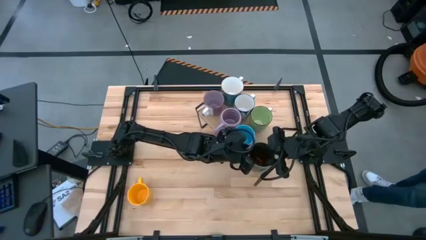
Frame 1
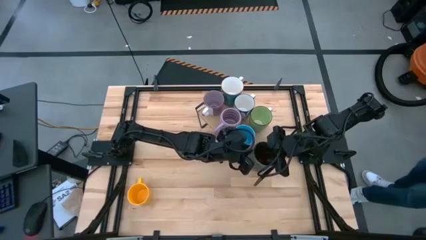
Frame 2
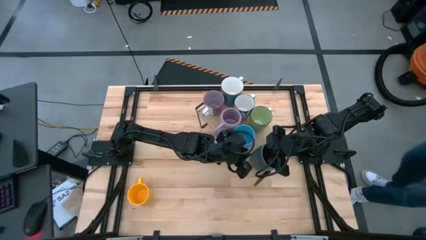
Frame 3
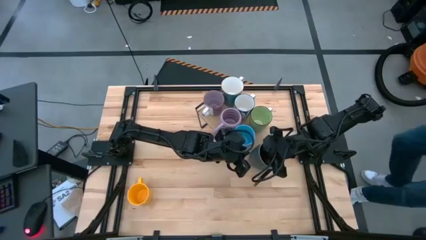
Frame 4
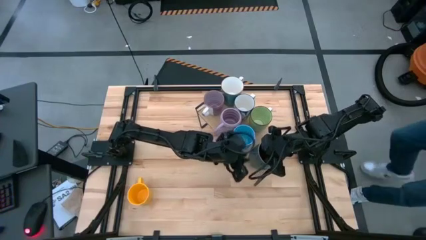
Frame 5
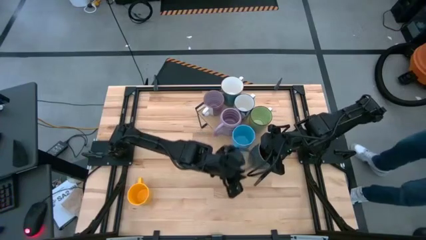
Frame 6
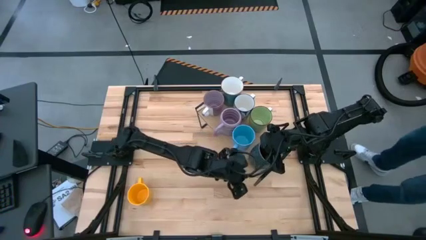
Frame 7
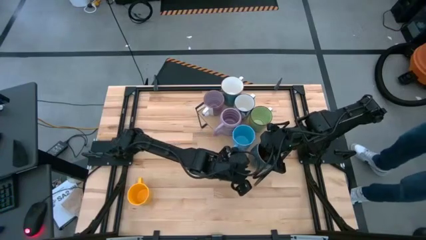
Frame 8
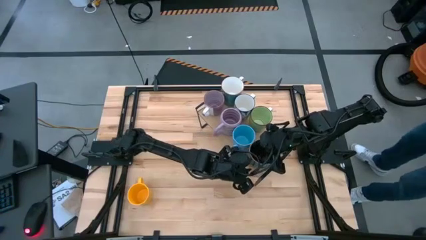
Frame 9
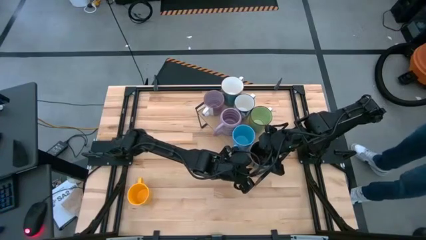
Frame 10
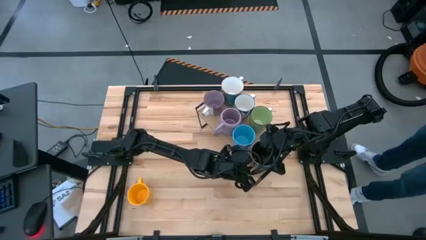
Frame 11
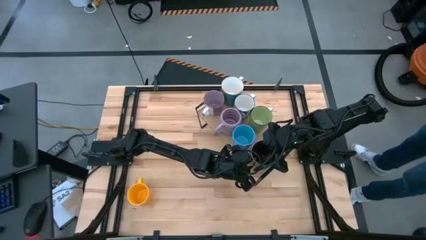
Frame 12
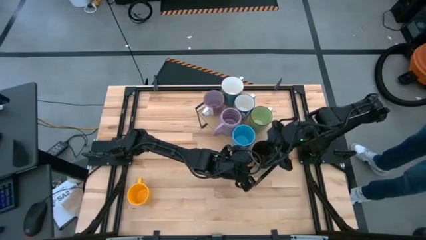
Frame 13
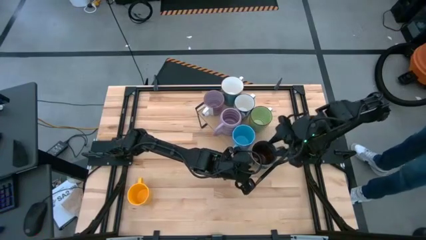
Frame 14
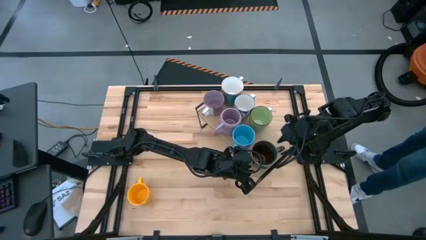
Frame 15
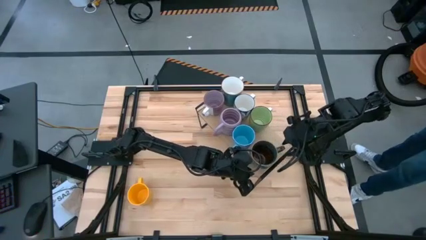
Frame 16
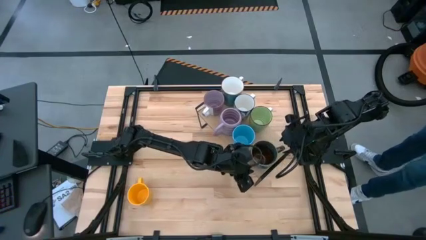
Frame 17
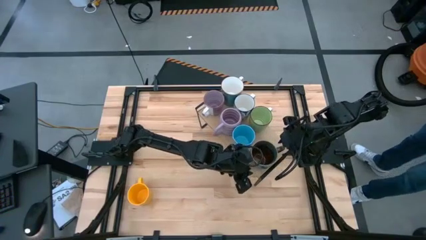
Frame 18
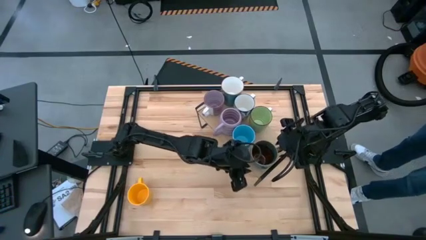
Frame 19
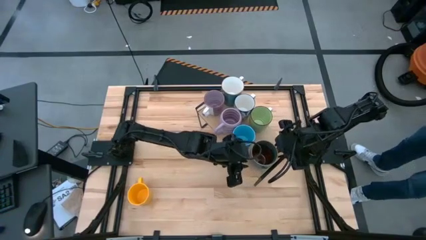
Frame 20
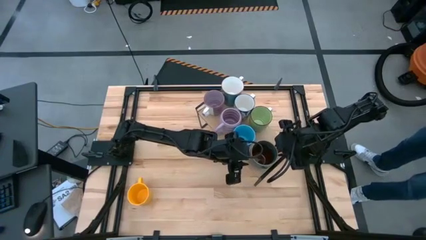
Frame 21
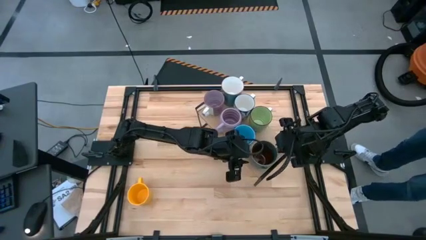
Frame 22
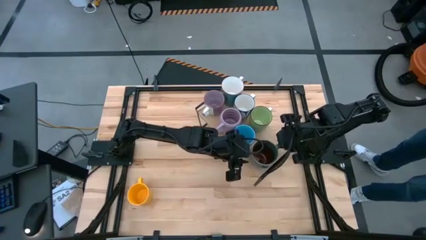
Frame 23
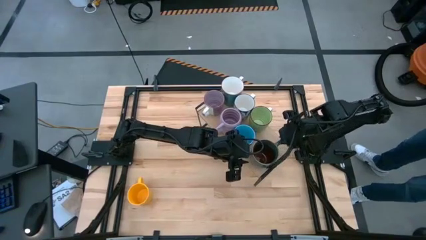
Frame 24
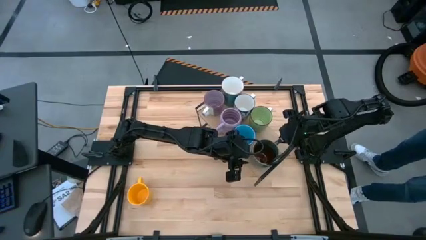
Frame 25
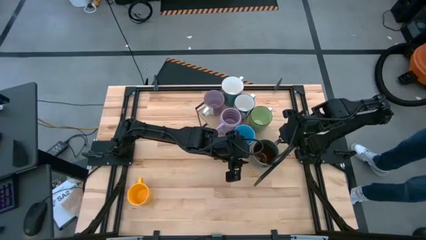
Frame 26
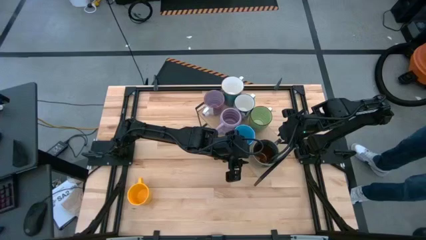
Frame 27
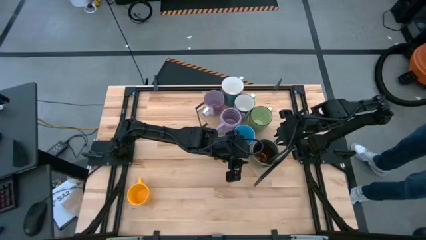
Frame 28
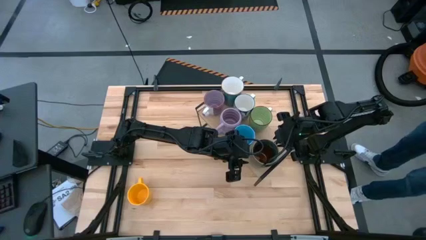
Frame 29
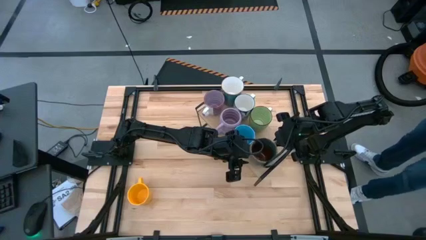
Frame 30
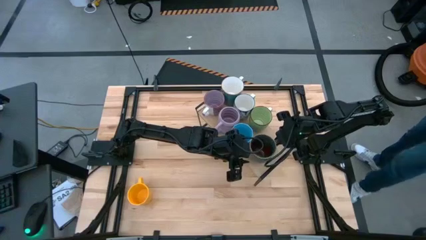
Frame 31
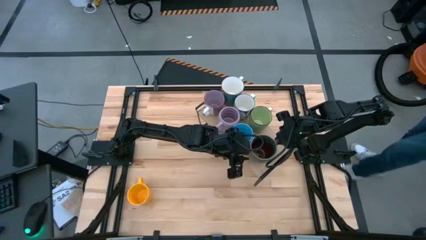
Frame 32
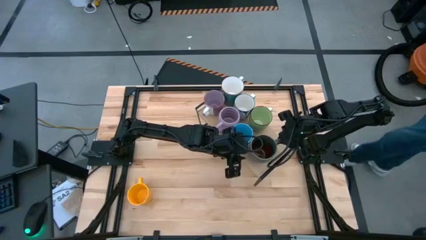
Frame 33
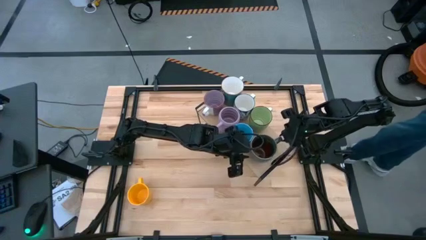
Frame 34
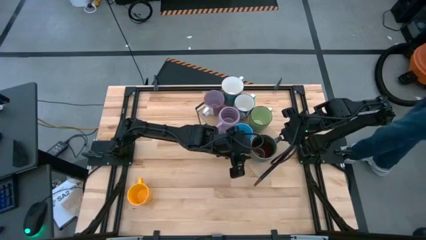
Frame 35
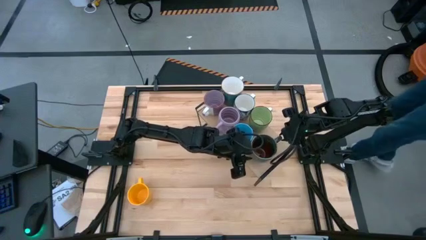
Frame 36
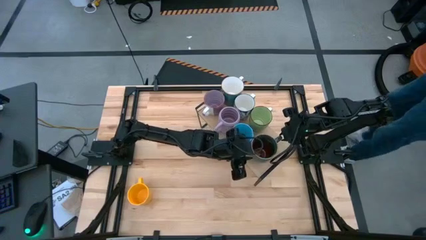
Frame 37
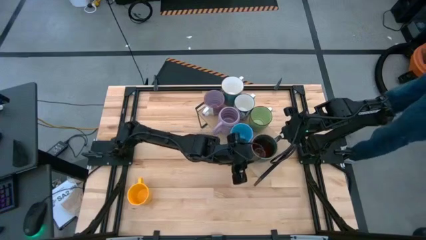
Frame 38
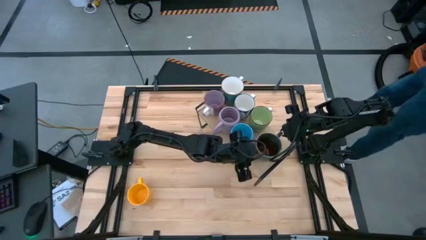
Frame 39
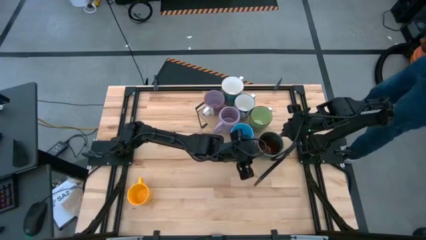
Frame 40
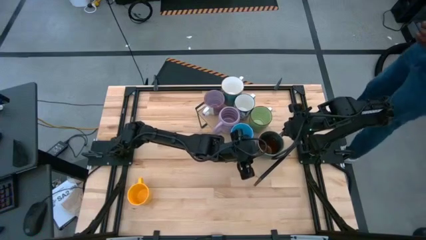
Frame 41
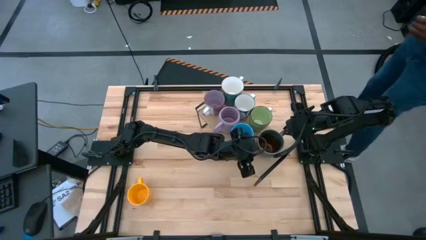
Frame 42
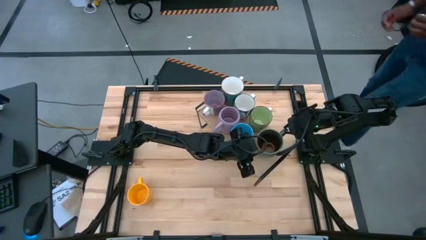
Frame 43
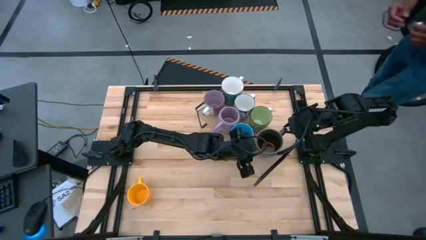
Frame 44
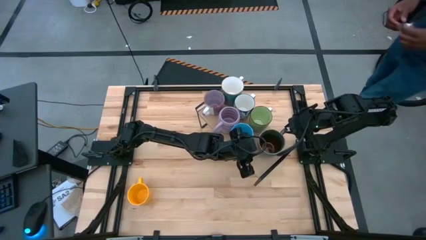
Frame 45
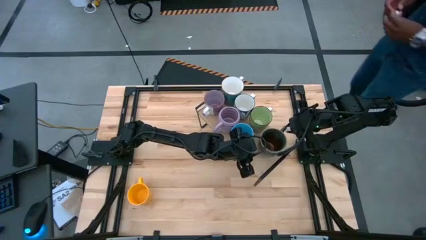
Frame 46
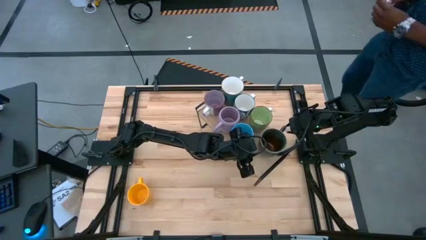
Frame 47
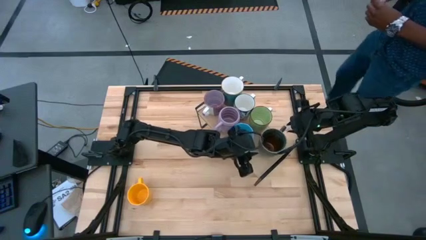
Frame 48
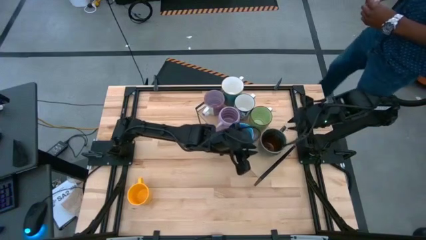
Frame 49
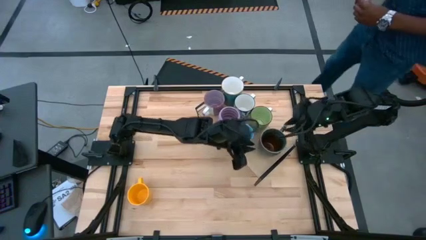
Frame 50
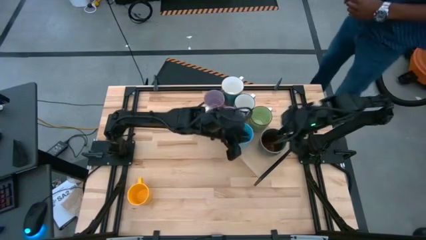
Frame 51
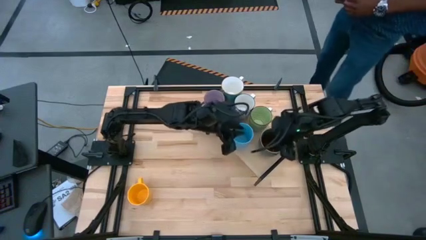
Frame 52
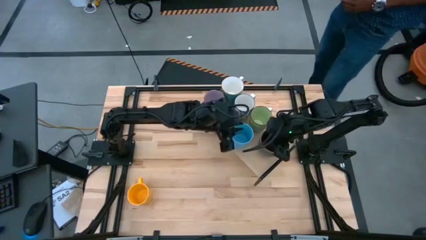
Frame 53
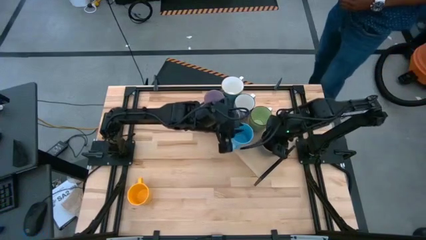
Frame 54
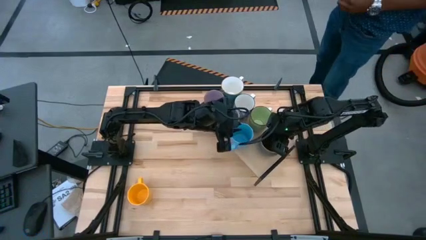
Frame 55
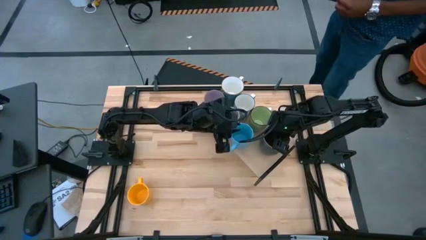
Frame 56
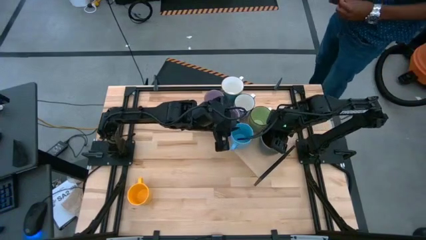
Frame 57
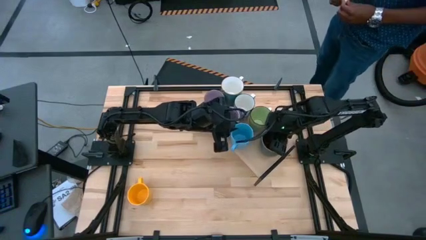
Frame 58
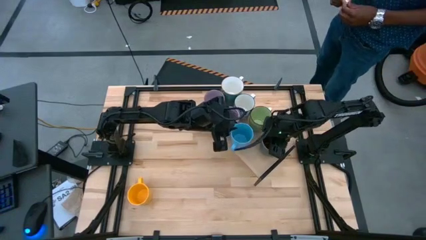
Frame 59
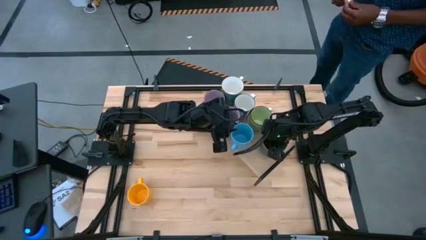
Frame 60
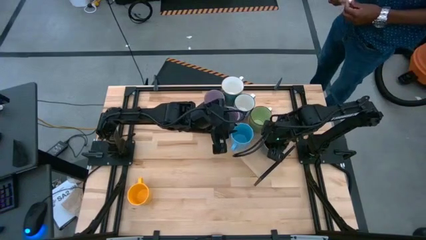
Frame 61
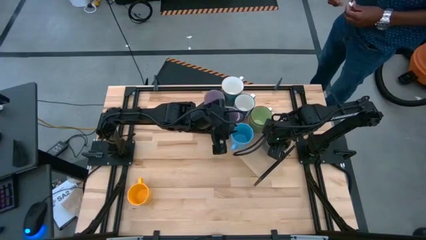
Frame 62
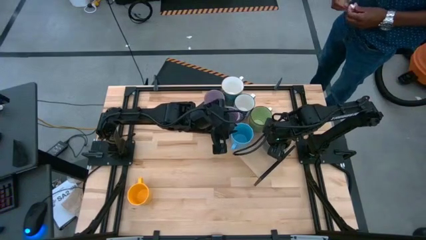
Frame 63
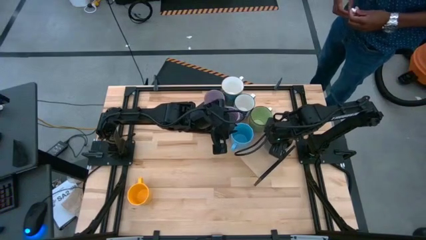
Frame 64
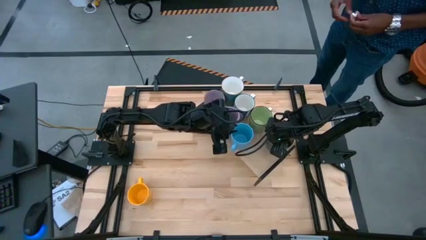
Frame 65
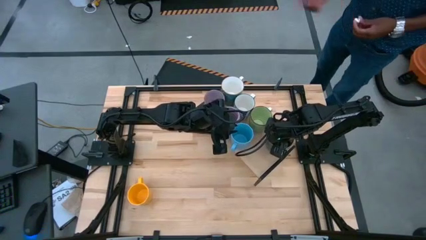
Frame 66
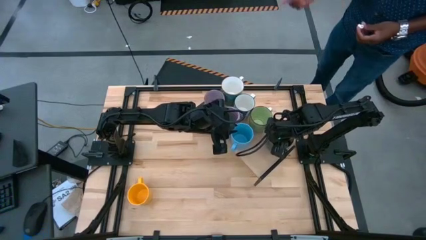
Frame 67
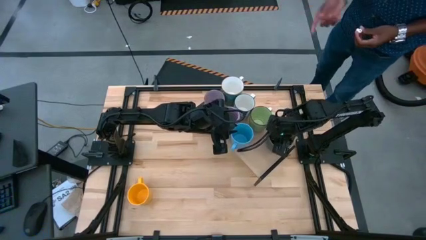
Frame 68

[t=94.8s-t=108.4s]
Task: Place coffee mugs
Put the brown mug on the shelf

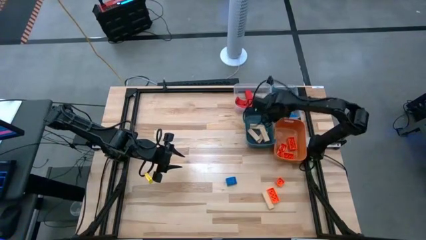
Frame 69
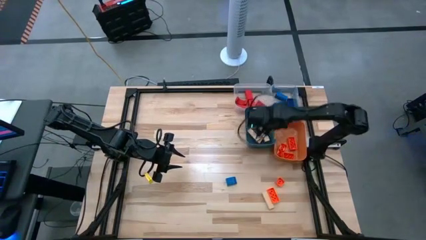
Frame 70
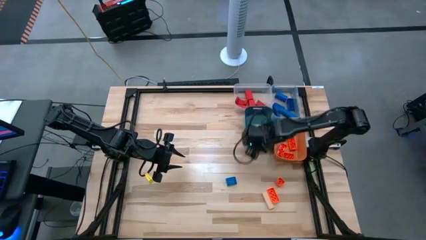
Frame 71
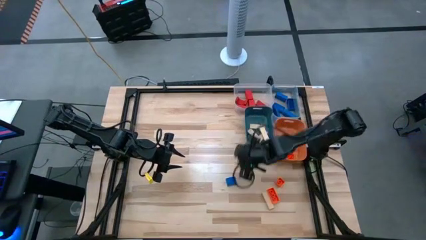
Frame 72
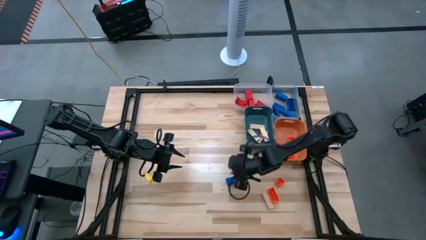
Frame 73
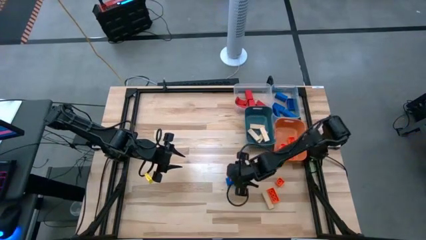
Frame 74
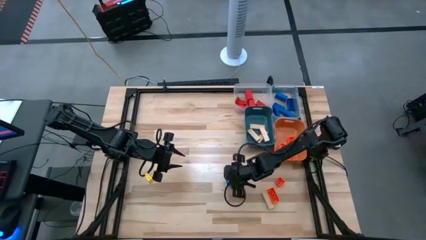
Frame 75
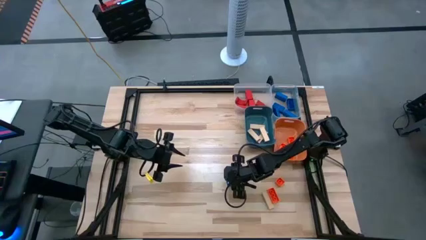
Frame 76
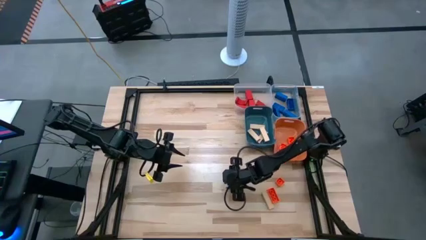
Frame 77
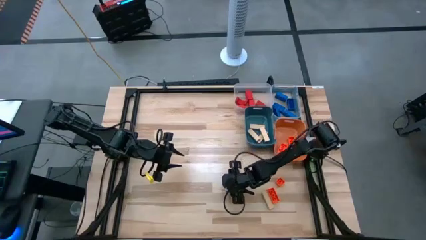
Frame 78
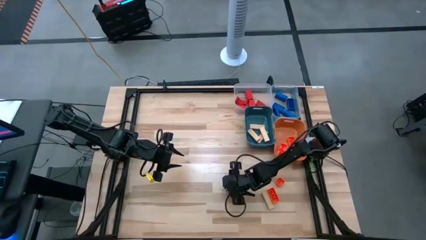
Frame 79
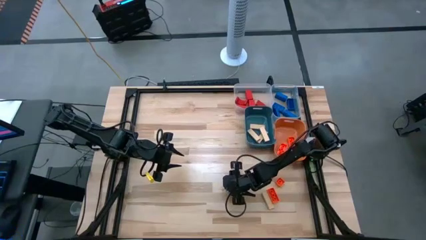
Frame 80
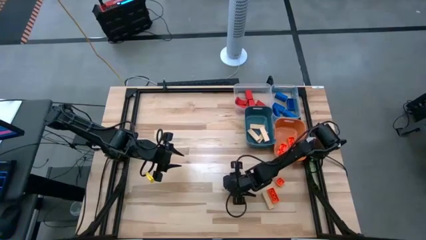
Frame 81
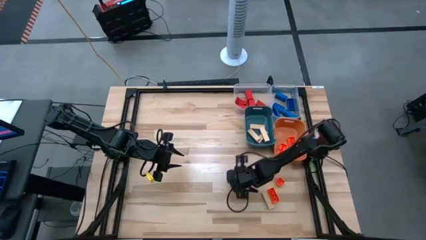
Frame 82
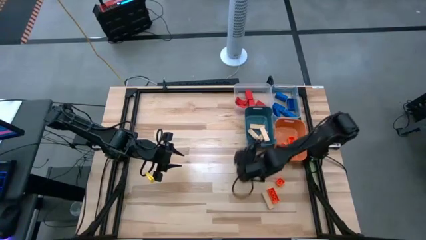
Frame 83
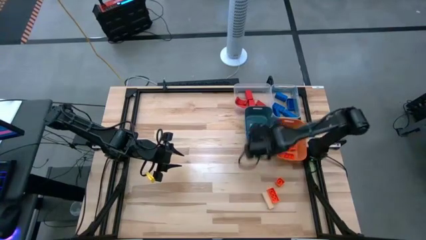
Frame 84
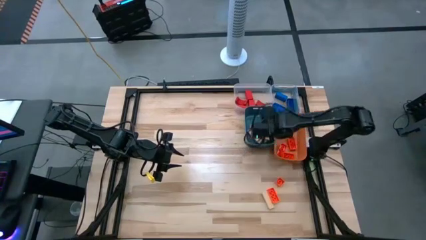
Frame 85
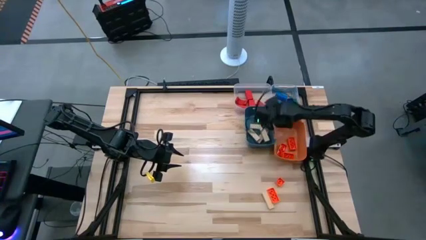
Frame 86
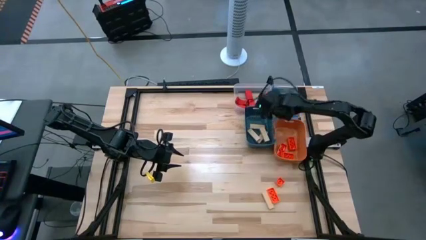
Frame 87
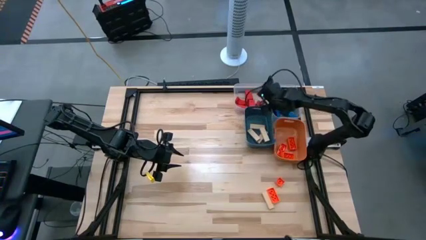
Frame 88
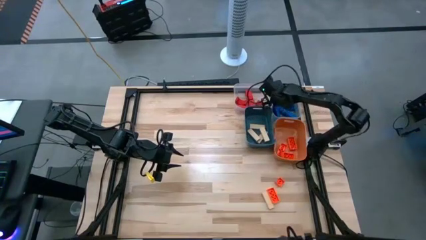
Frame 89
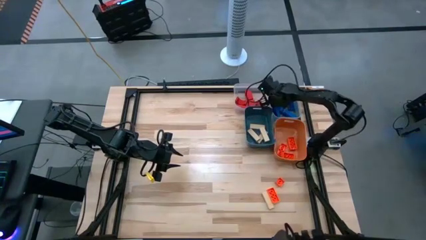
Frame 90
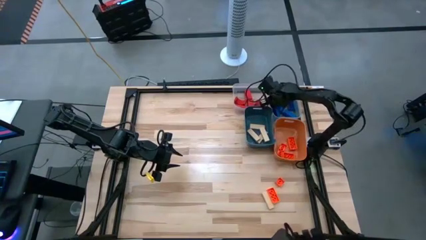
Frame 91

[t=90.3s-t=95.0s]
Task: Sort blocks
Put the 4 stud blue game piece into the right transparent bin
